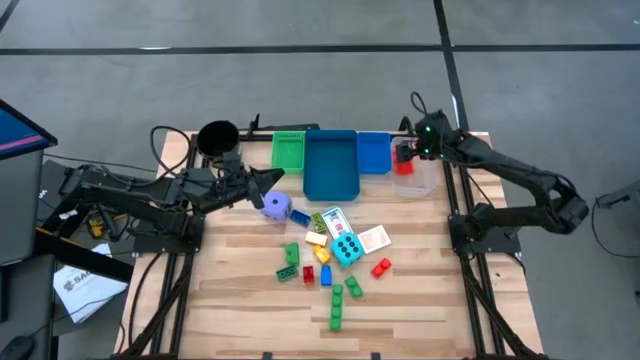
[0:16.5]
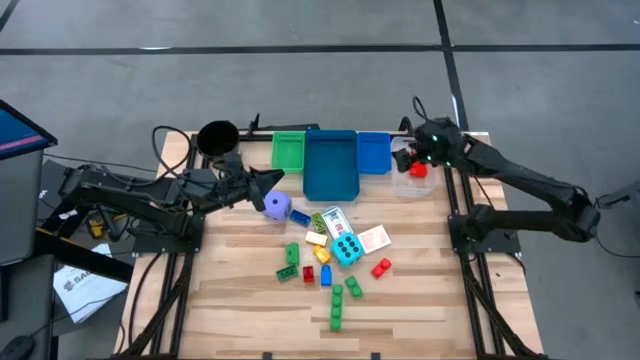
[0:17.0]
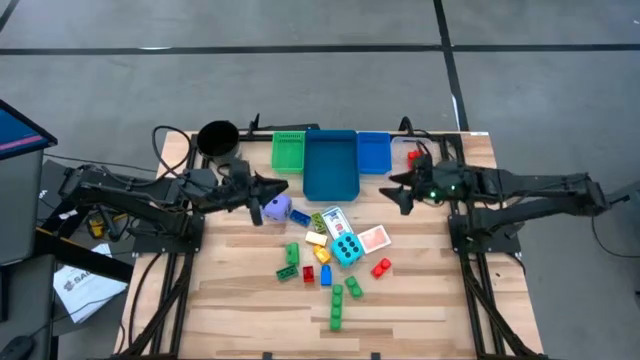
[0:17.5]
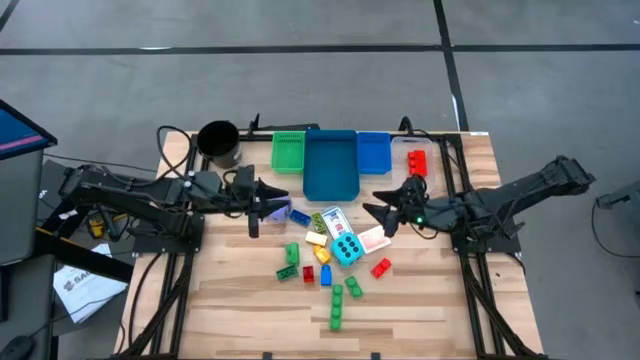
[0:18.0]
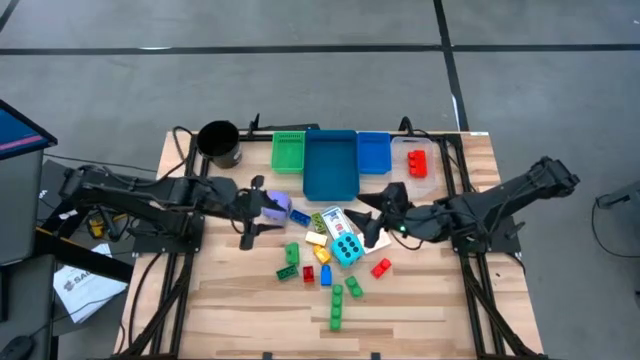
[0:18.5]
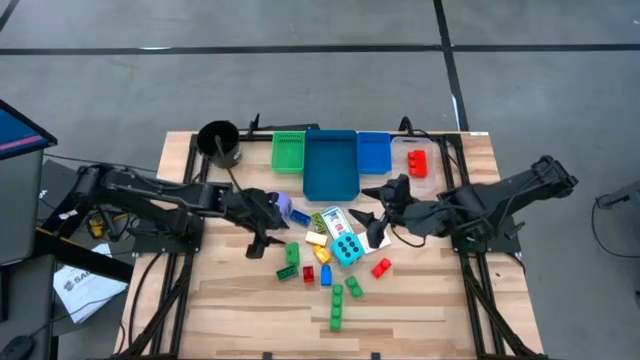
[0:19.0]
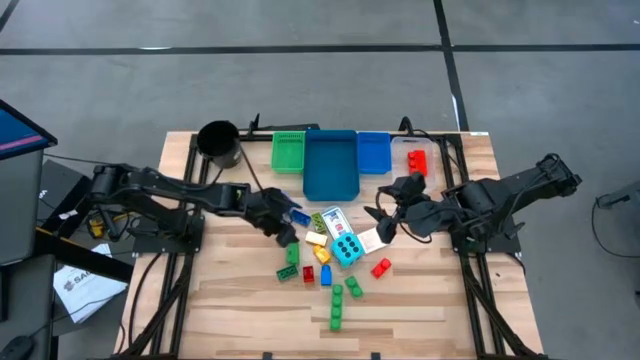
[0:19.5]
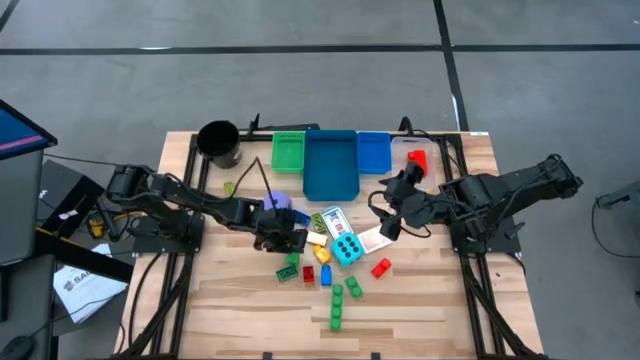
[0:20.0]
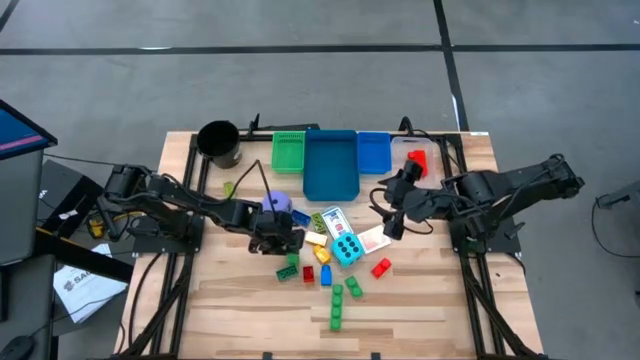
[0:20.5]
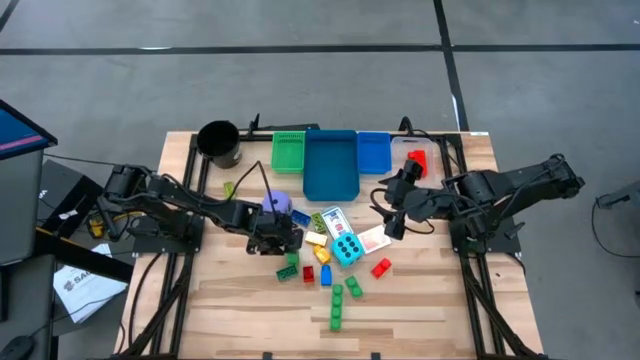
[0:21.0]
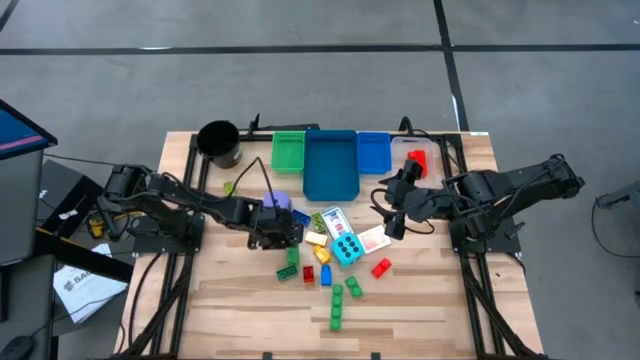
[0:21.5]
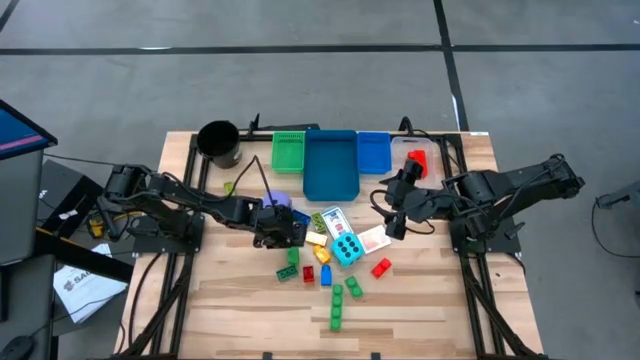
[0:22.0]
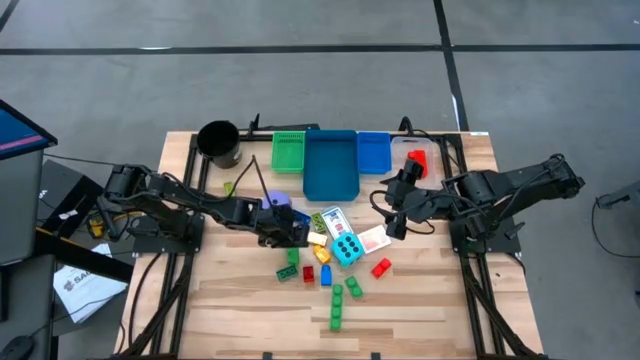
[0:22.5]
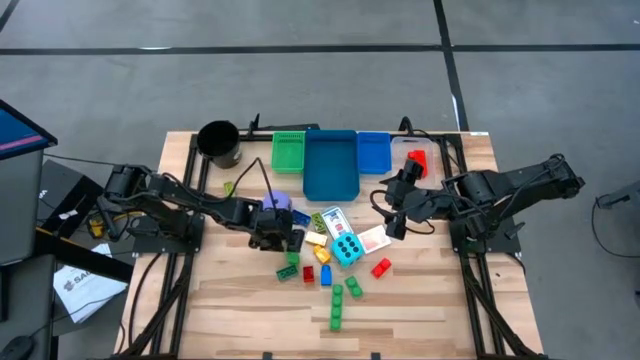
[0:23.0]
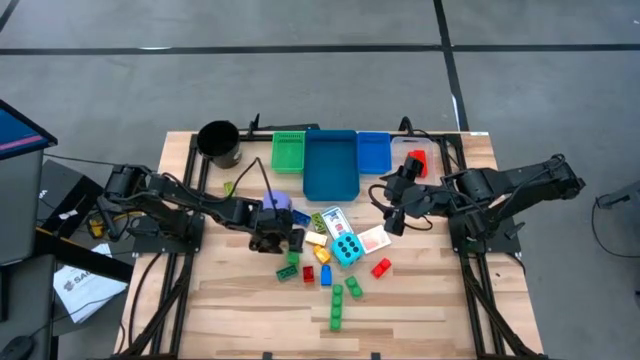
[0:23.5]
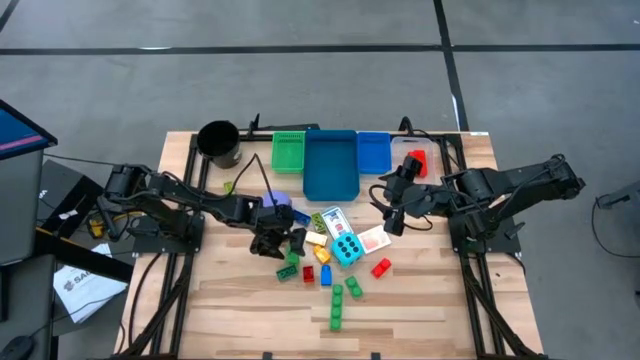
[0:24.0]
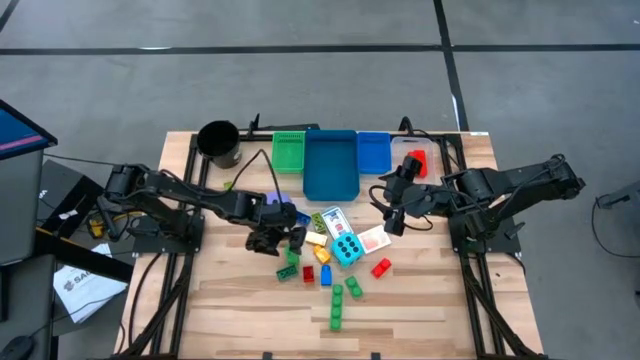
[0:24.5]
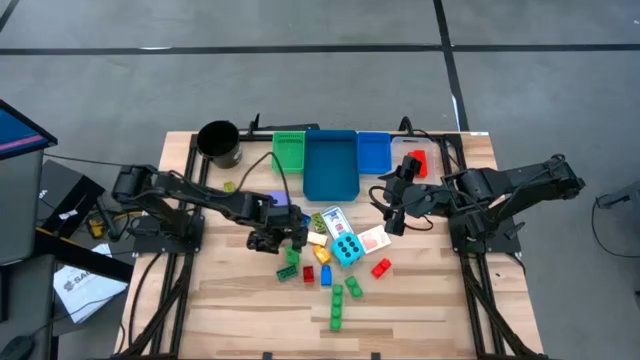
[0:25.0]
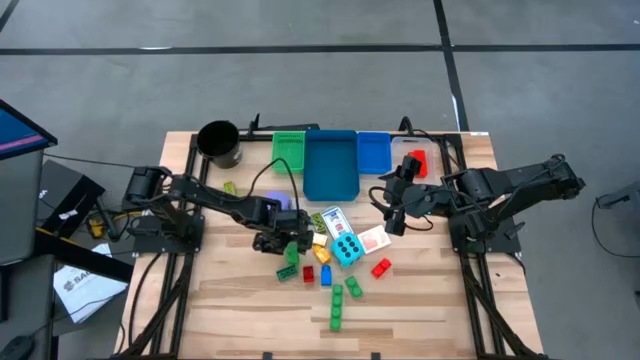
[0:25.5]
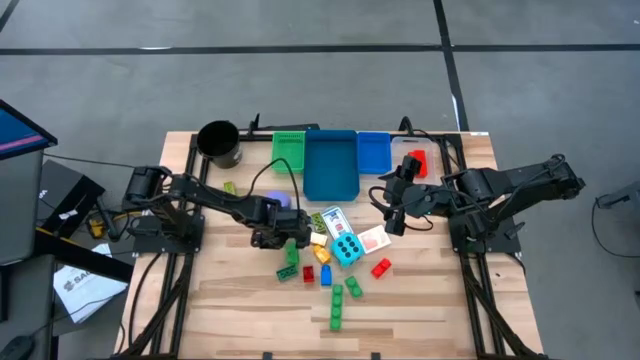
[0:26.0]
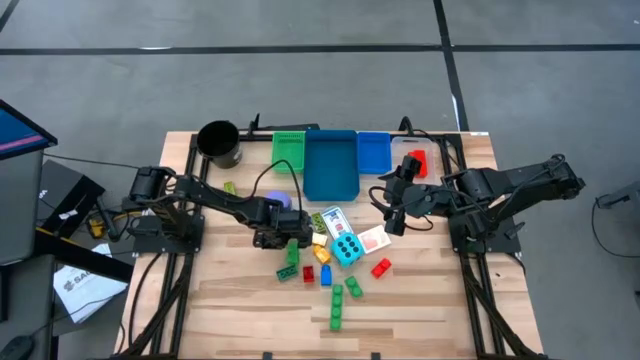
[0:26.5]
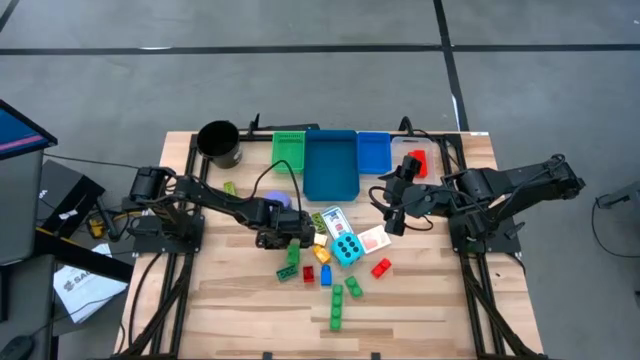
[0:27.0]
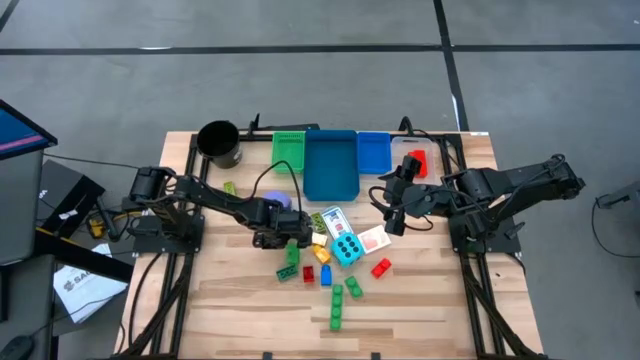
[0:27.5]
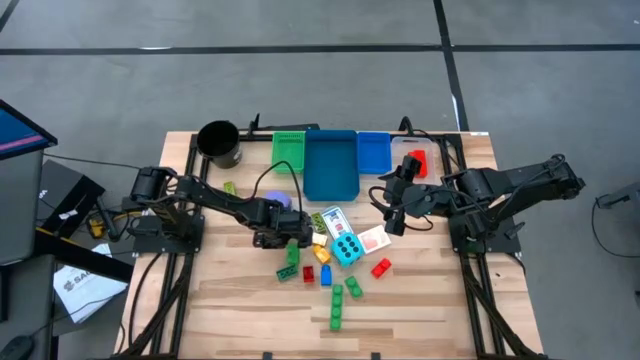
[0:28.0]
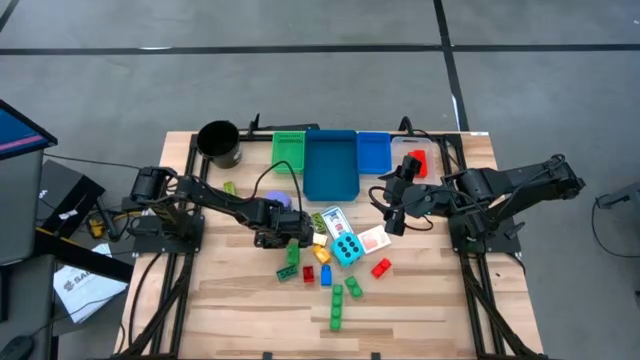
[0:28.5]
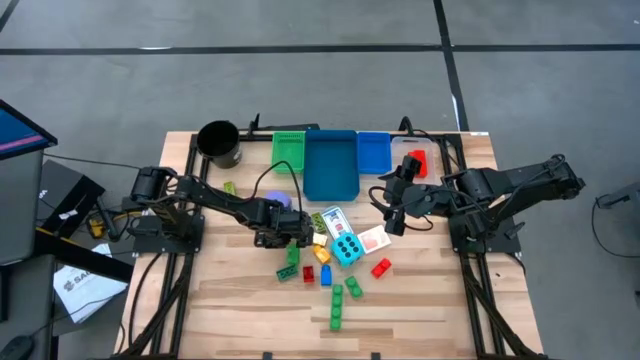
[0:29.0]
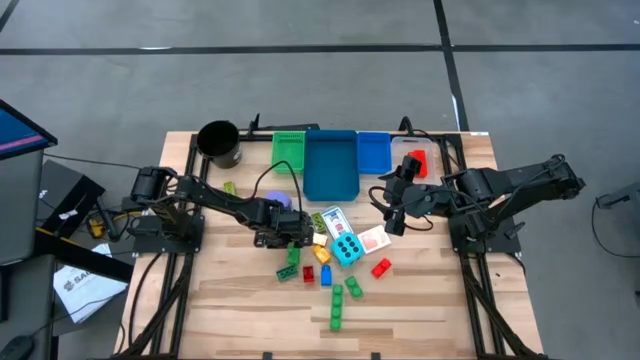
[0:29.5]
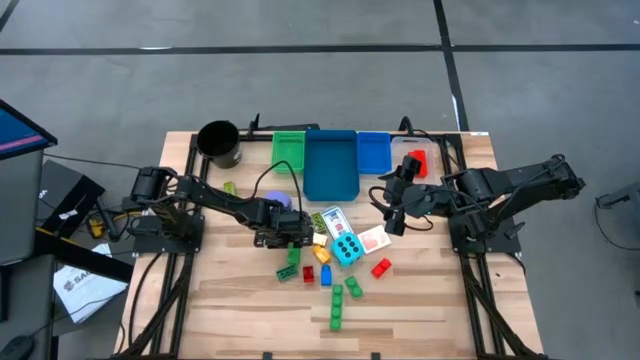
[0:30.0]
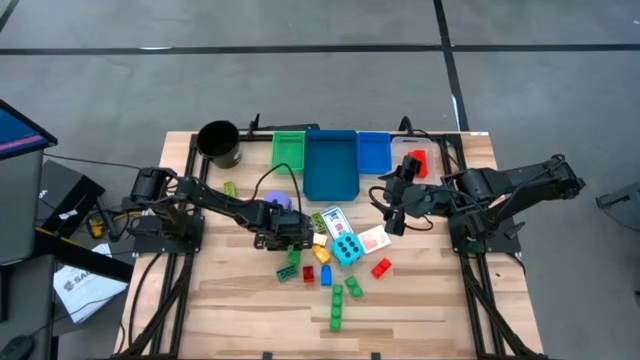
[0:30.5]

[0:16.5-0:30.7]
Task: Pick & Place Toys
Put the large green game piece into the transparent bin

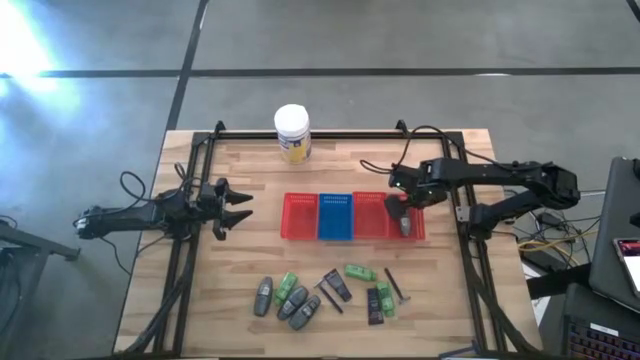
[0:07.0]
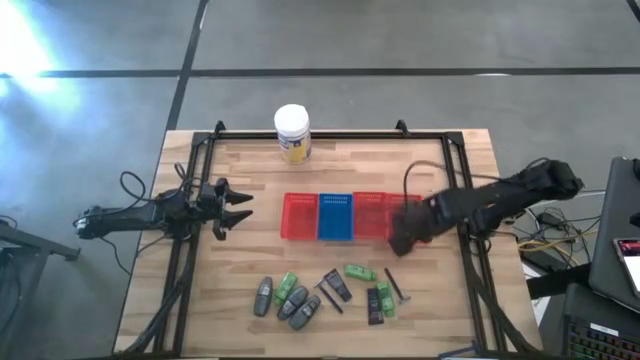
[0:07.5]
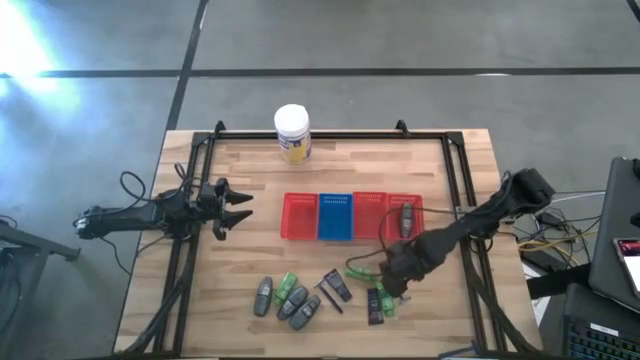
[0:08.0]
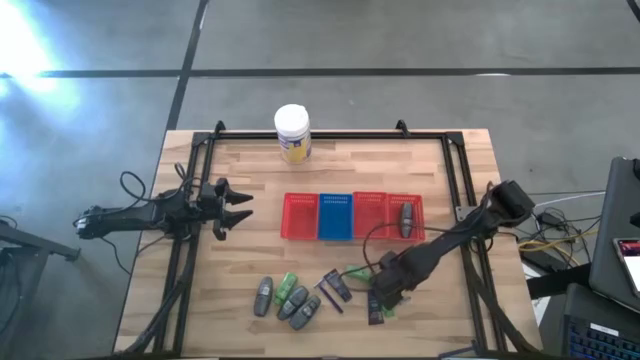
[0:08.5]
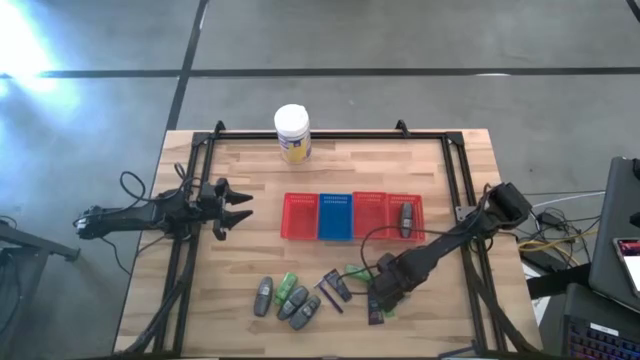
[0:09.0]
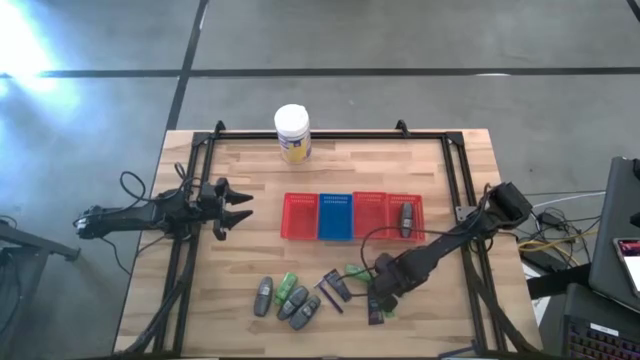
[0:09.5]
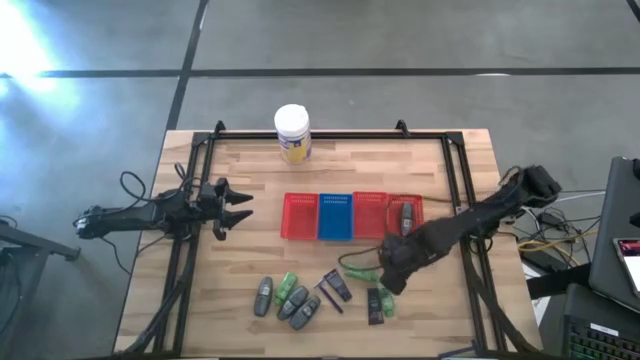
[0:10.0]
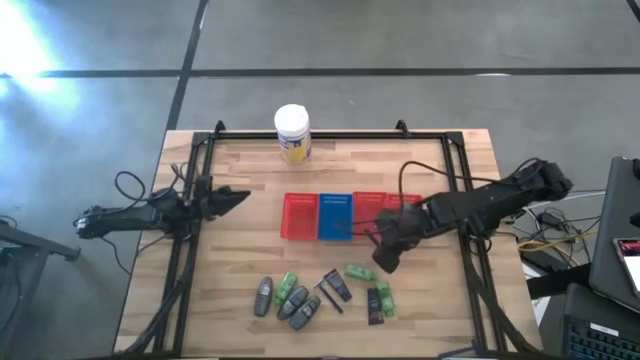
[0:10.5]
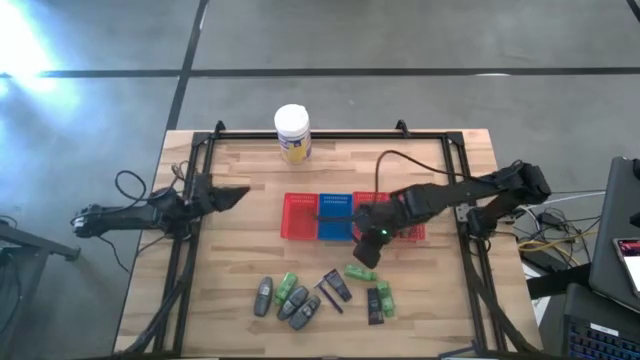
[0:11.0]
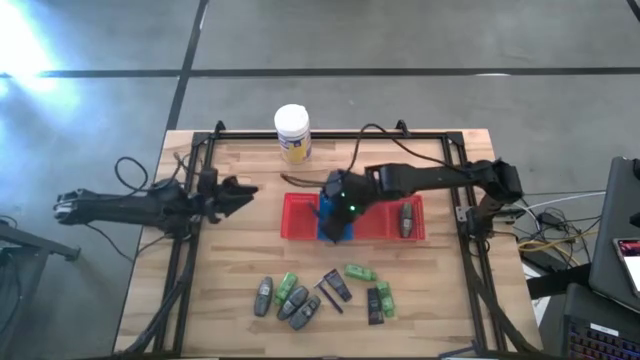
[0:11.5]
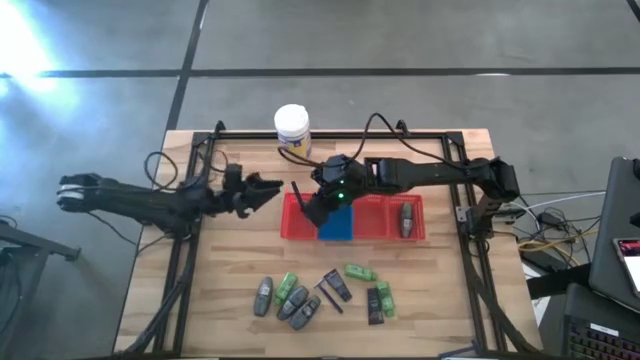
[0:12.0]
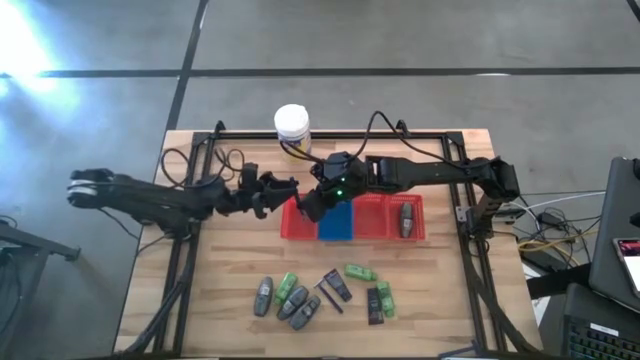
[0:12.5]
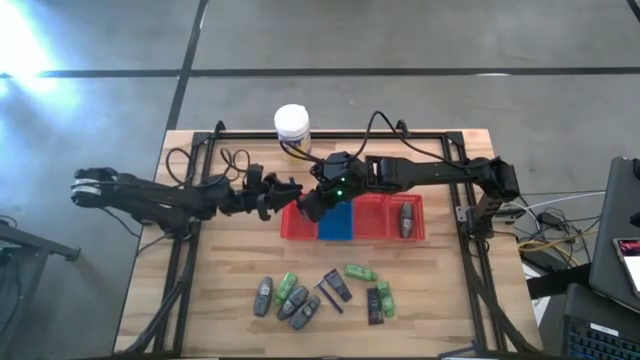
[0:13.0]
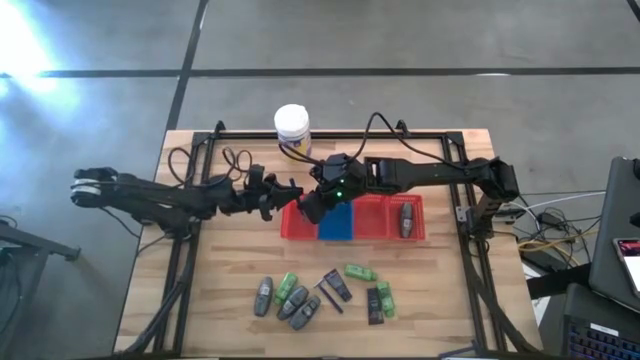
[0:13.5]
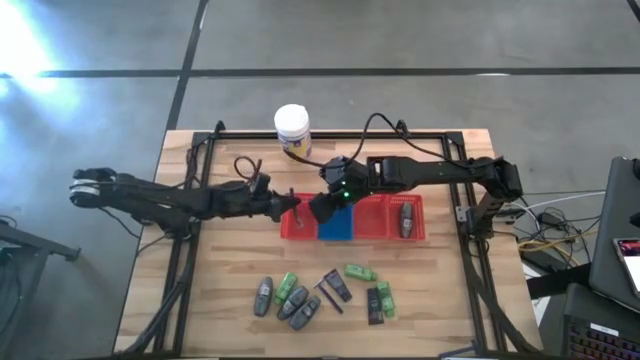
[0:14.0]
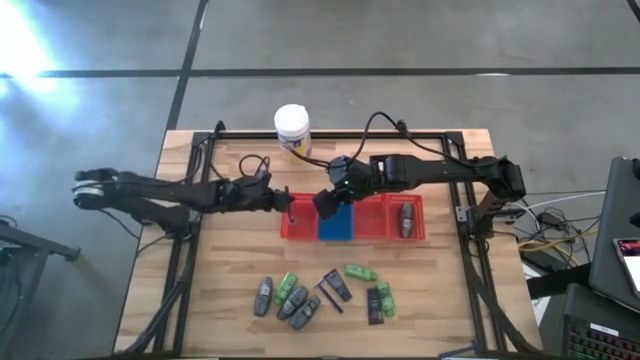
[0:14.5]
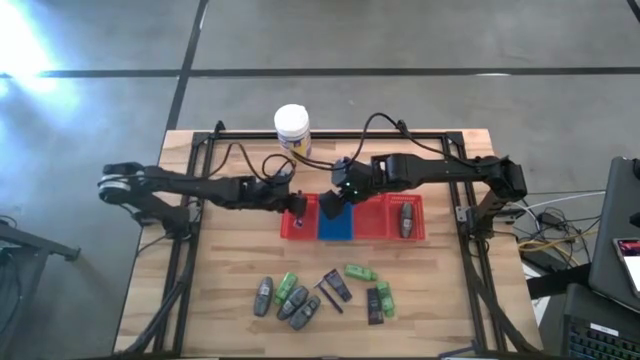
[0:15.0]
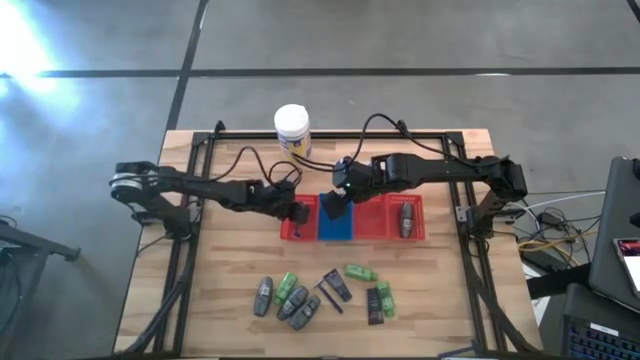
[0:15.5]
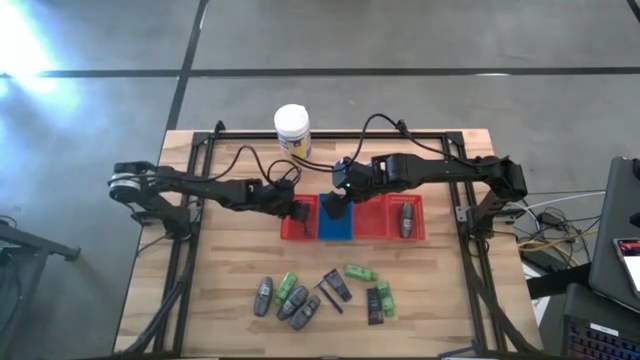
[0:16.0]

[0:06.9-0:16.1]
Task: Pick & Place Travel size toiletries
Put the blue razor into the left red bin
